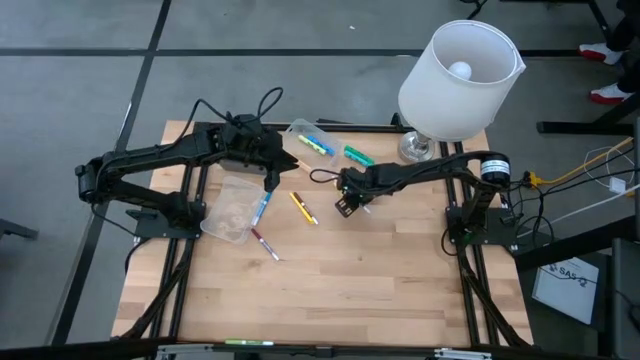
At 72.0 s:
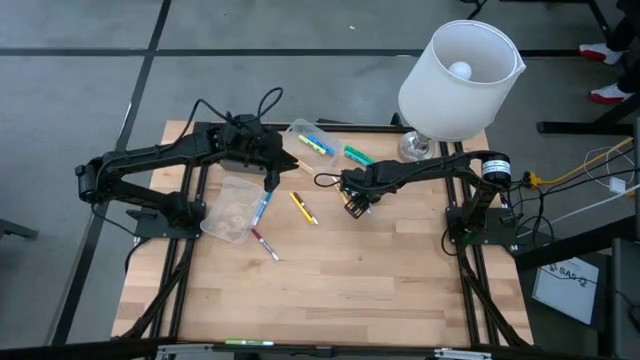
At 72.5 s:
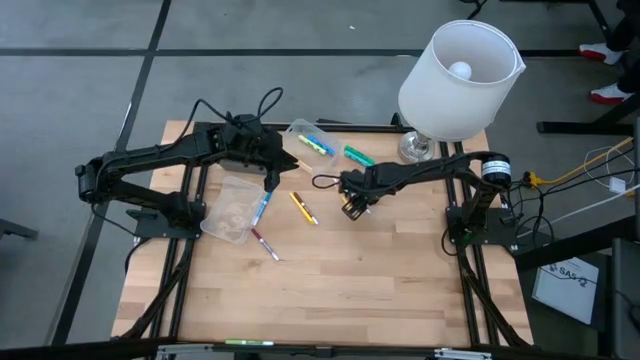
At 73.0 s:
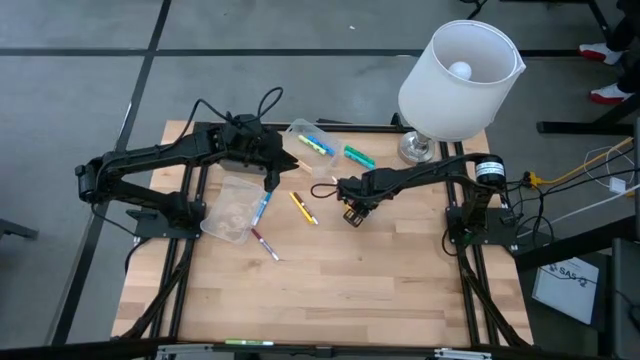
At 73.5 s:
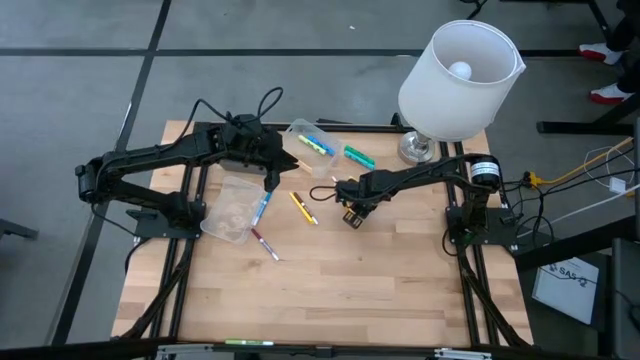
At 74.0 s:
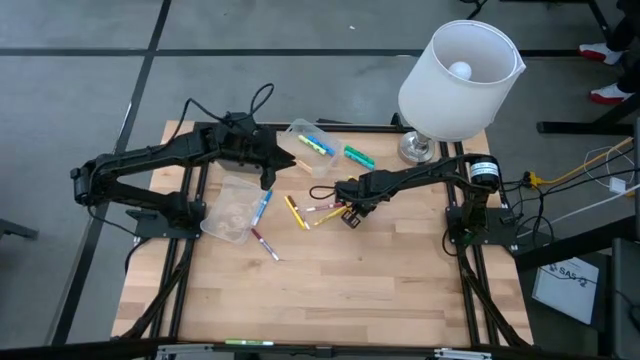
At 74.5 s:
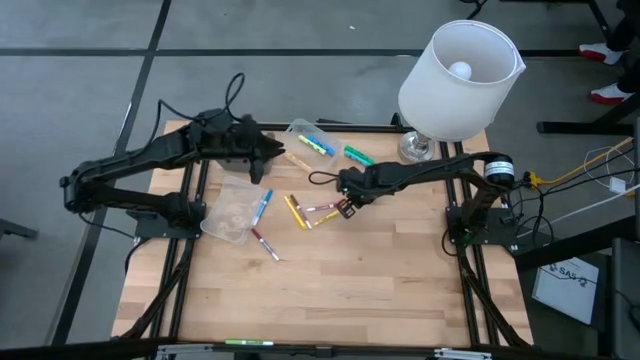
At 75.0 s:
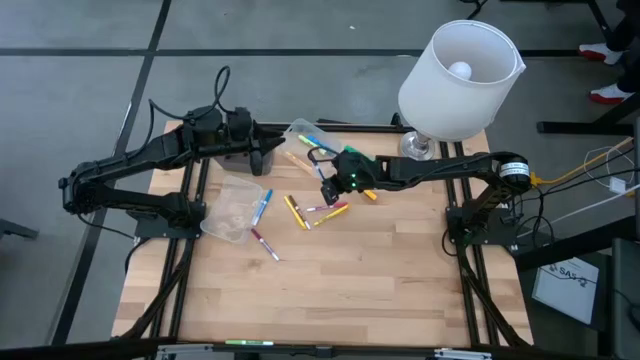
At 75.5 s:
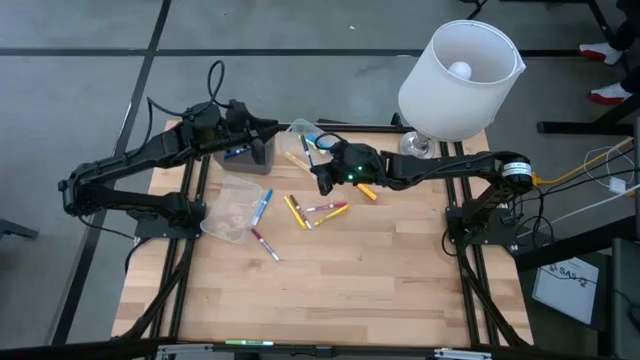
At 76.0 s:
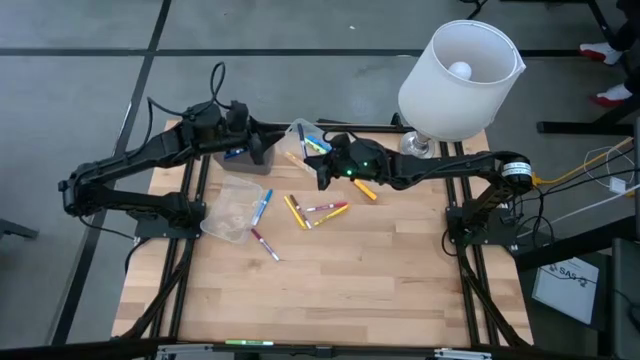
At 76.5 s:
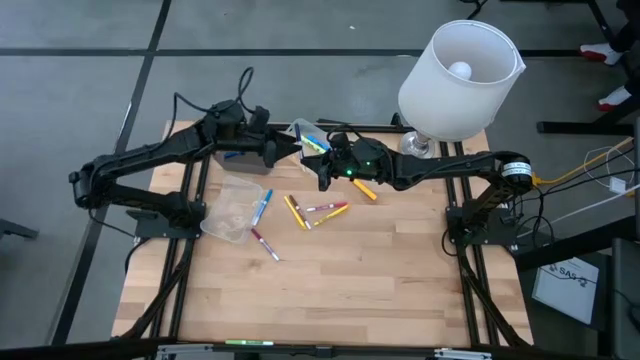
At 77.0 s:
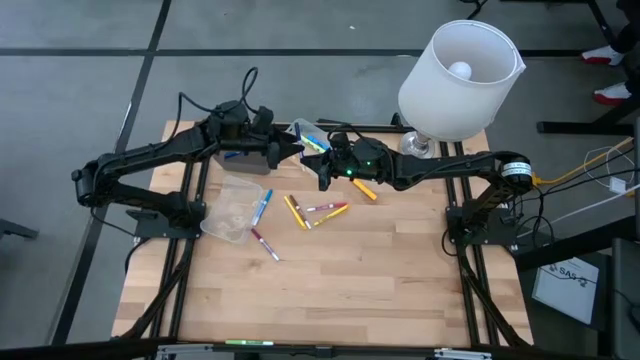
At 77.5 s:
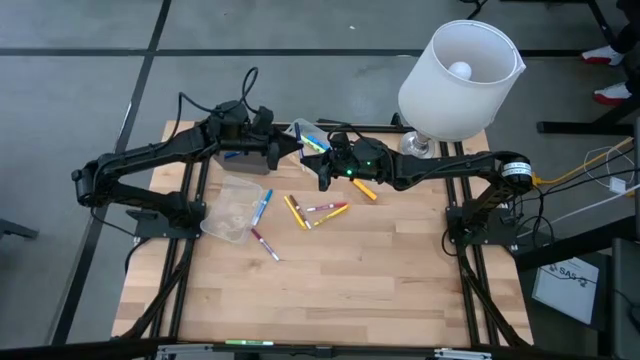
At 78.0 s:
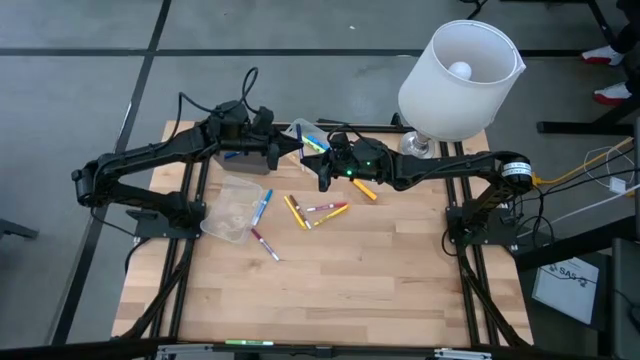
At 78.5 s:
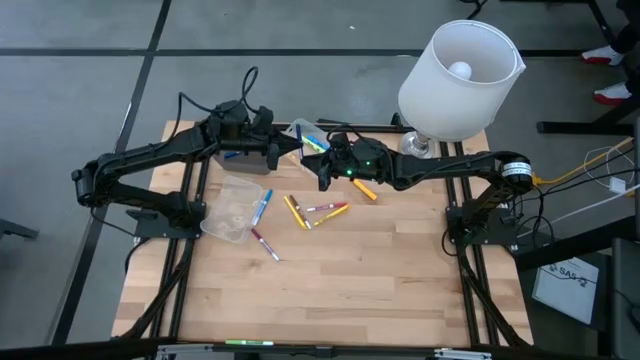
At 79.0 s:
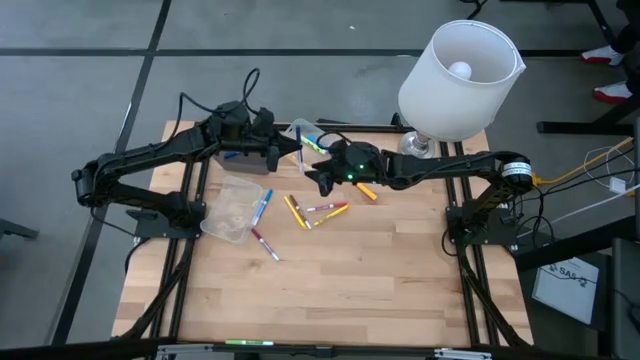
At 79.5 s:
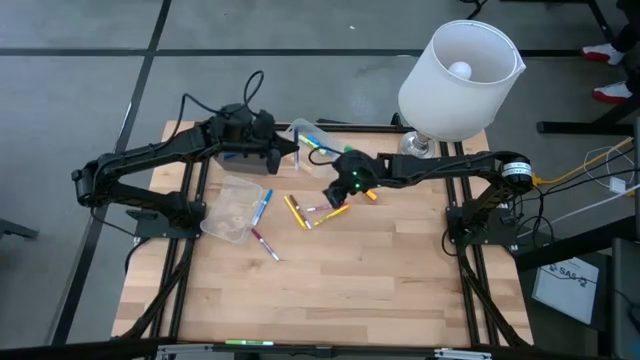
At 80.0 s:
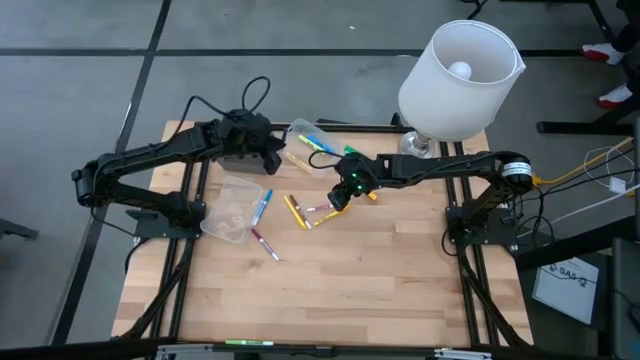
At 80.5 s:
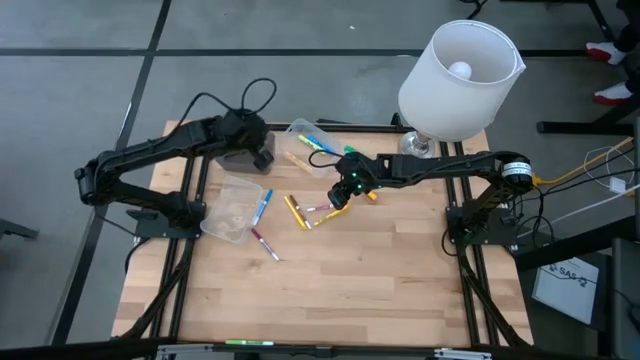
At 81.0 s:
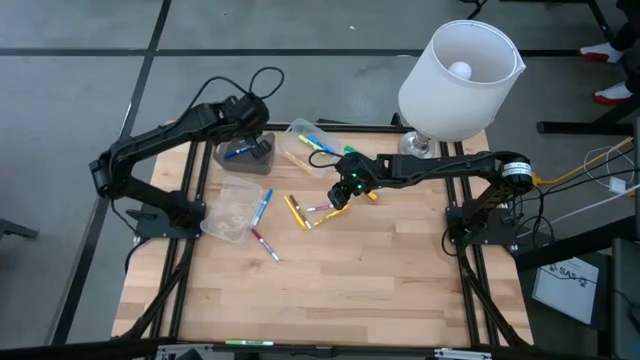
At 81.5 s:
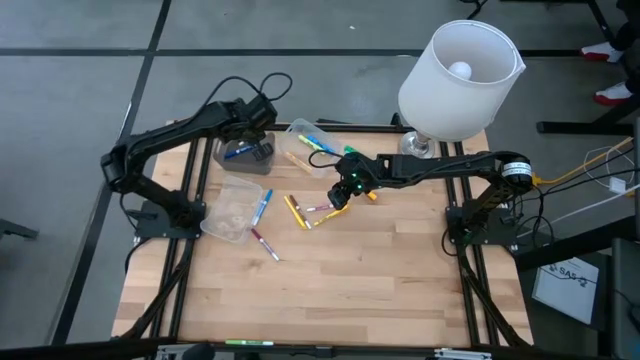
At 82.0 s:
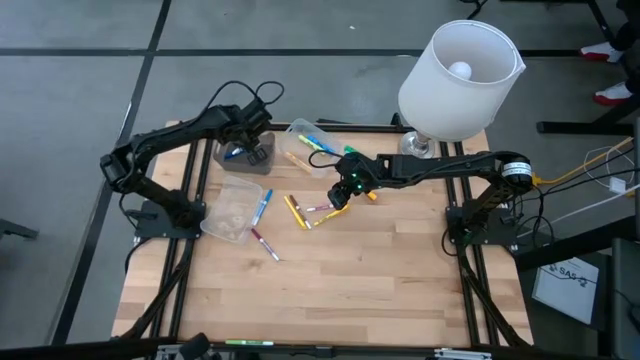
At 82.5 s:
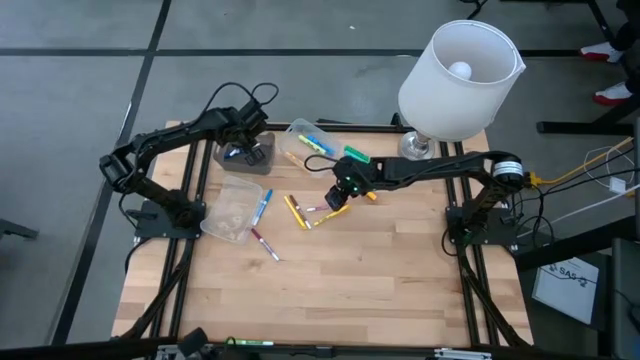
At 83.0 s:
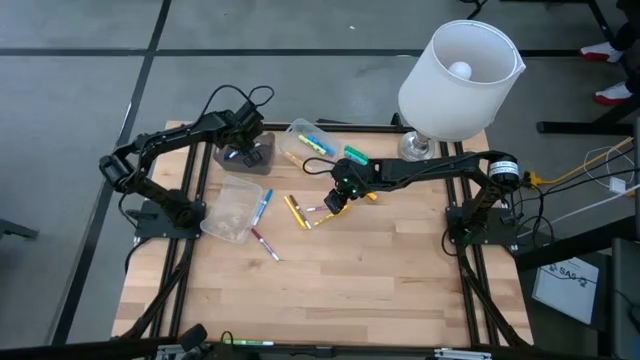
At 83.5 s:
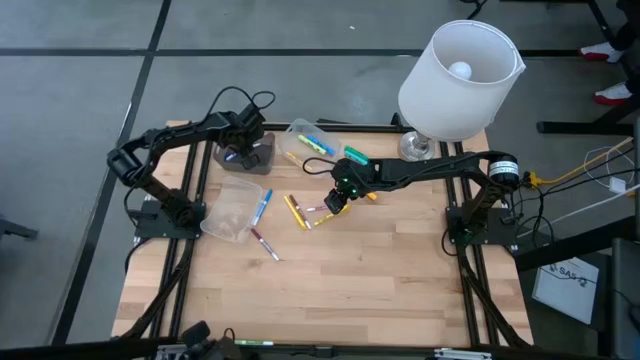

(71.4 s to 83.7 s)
Task: Pick & Place Markers
Put the violet marker into the black bin

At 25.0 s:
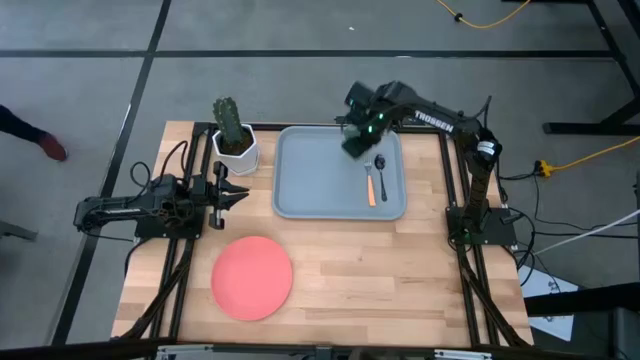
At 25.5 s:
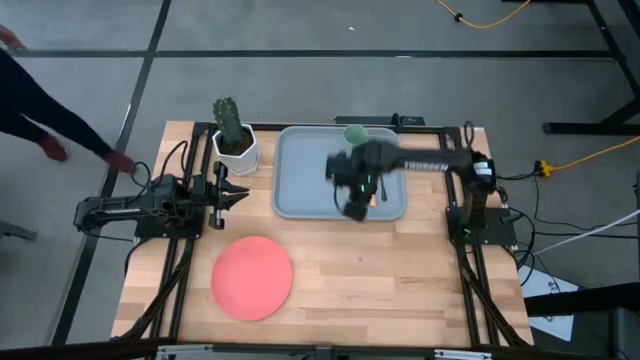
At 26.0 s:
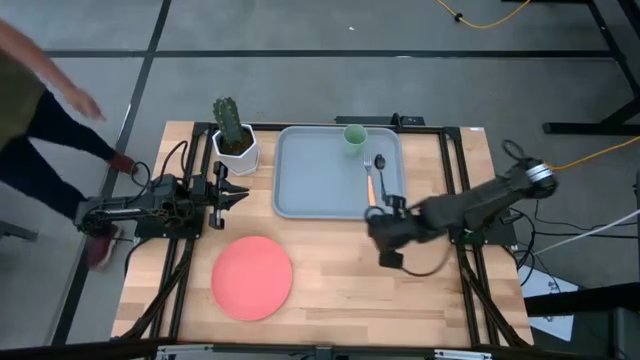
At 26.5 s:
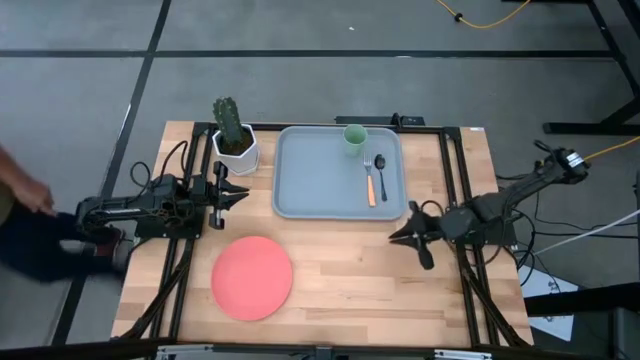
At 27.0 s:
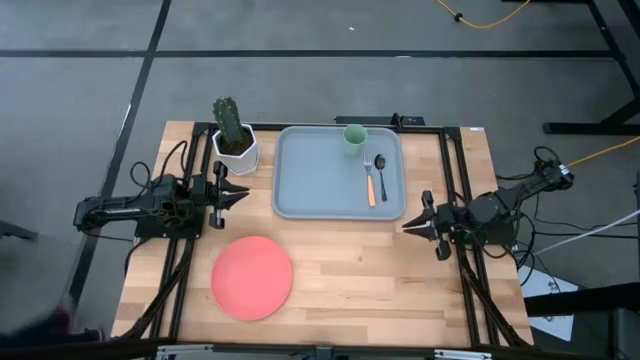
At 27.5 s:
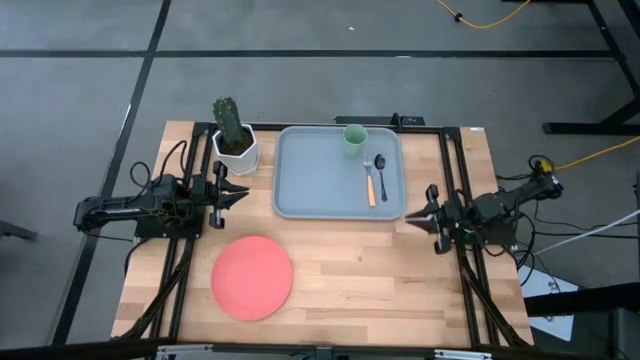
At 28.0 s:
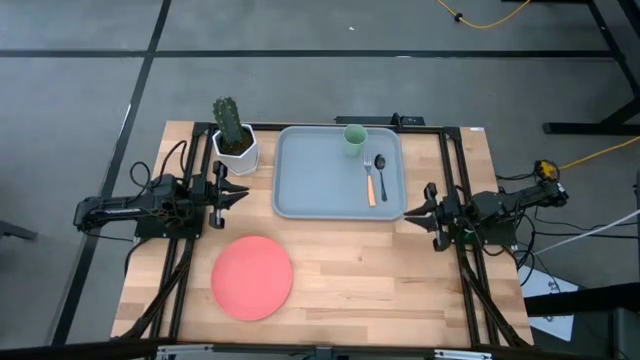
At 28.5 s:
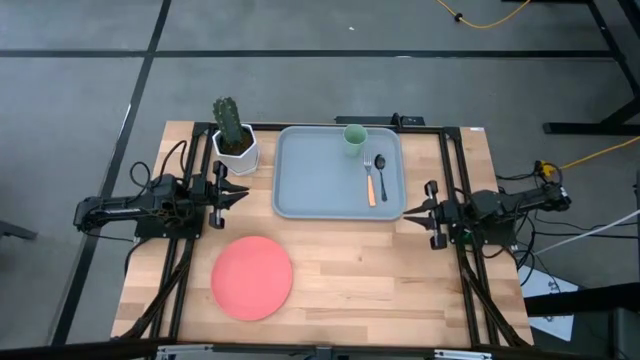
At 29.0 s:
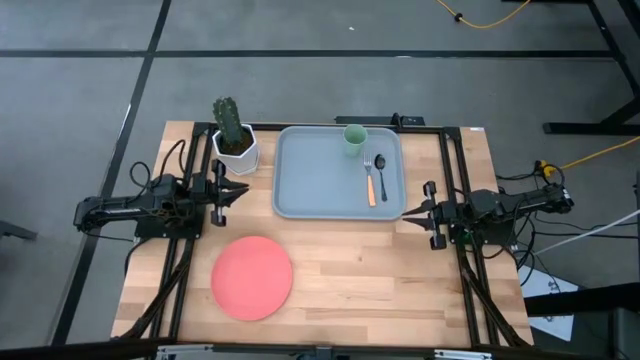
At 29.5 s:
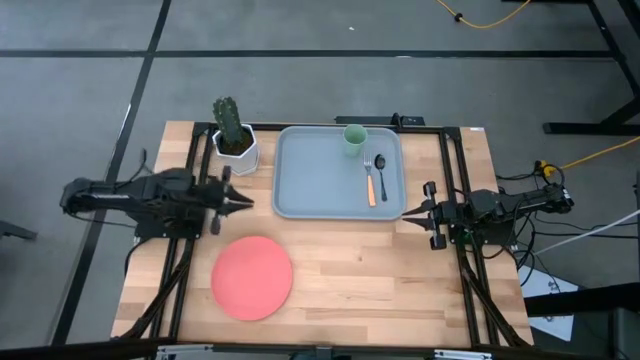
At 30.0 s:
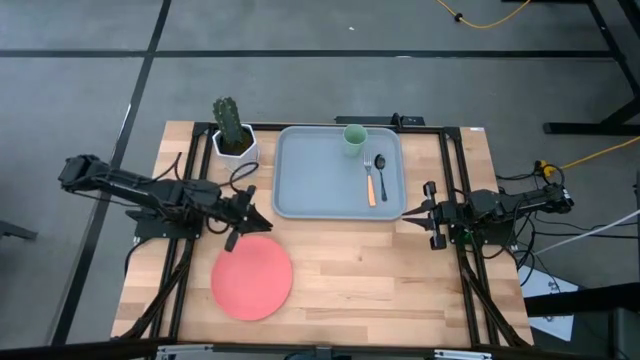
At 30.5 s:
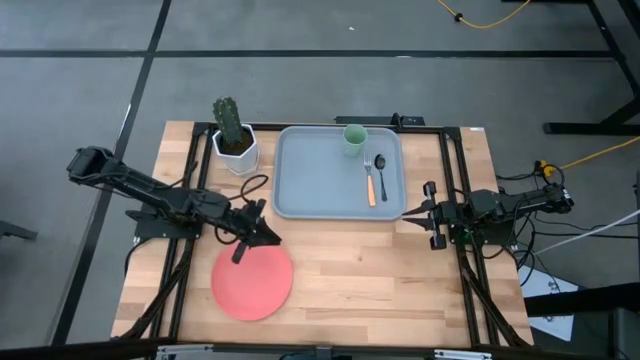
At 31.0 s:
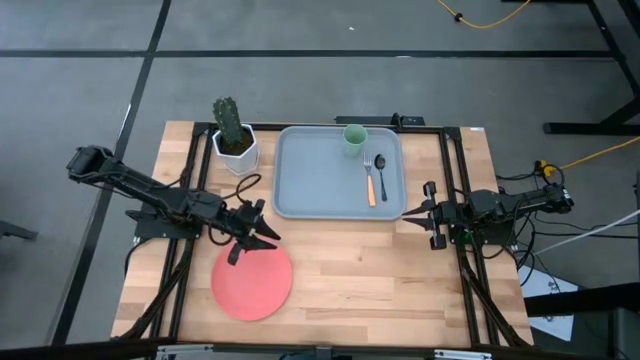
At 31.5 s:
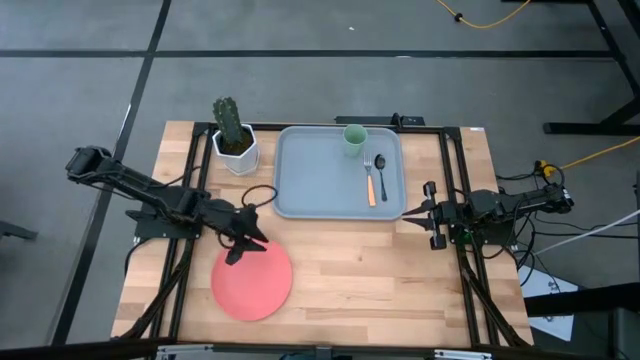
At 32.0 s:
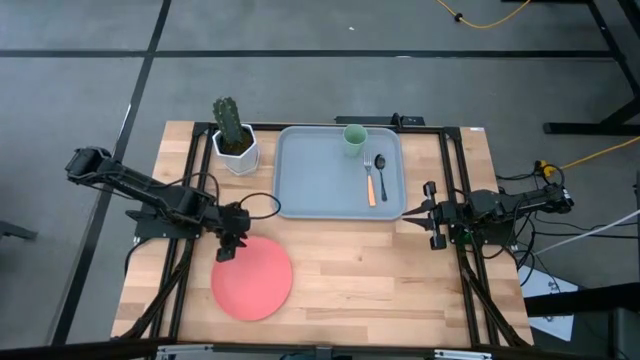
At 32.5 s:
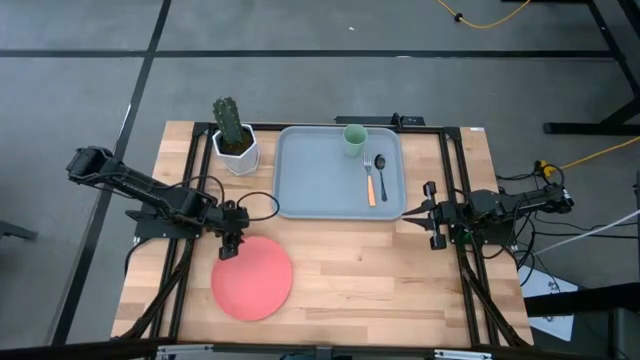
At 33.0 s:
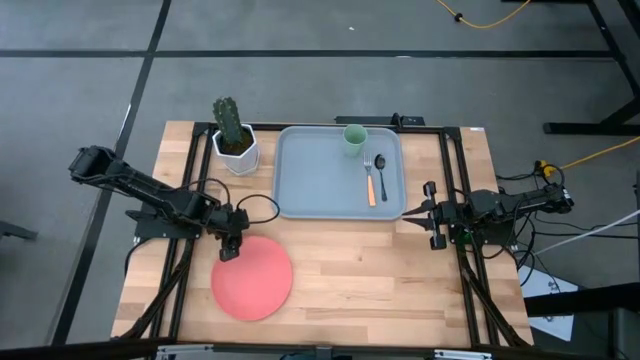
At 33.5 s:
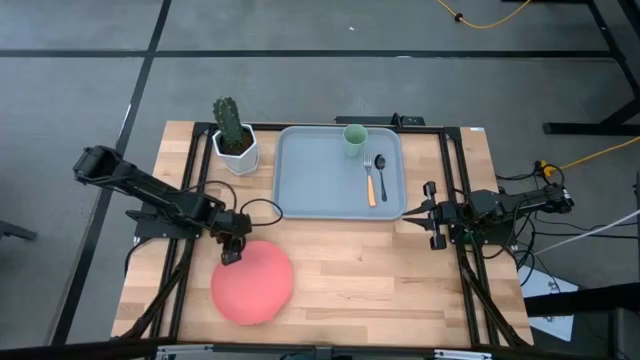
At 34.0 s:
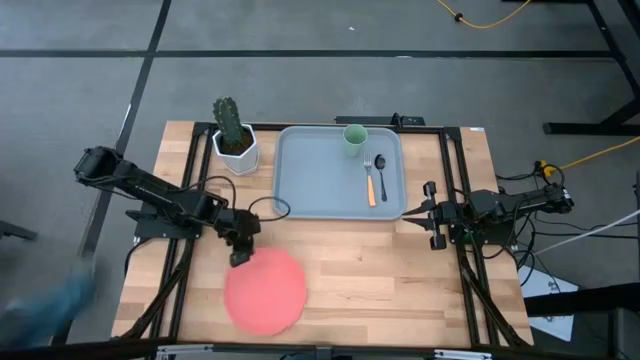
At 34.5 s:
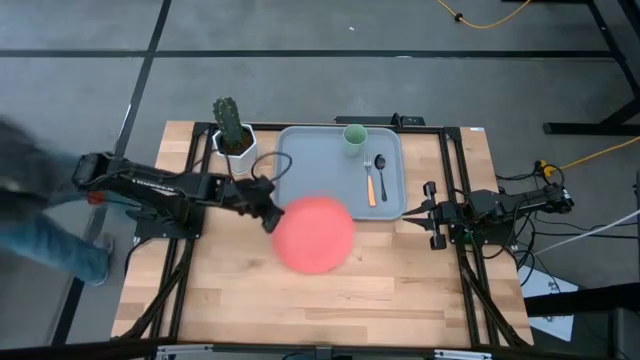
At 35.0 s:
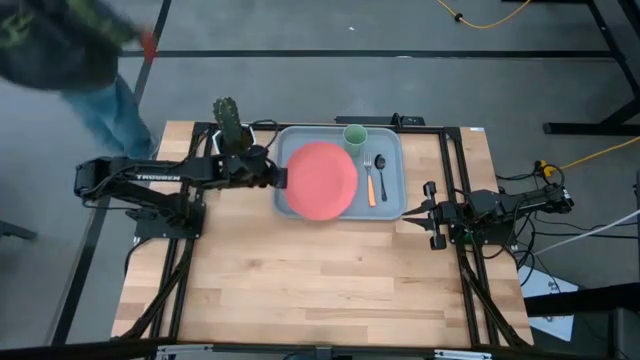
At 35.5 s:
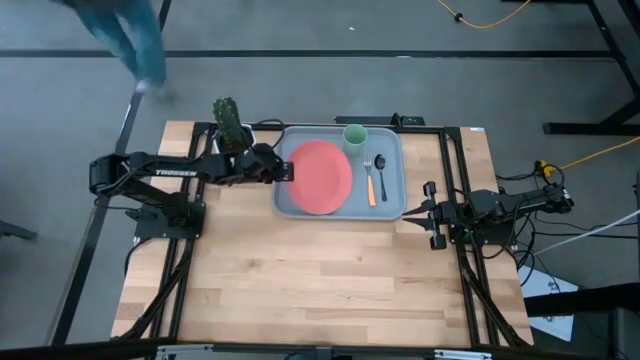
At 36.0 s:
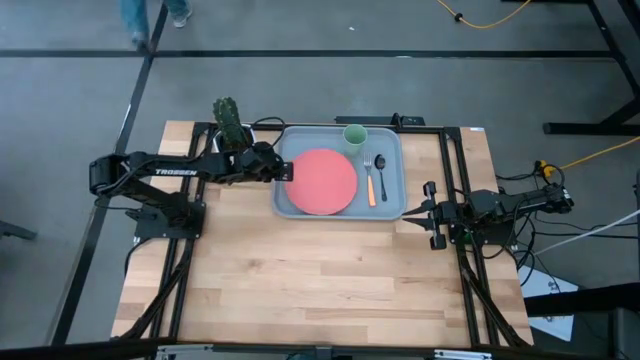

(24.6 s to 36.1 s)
Task: Pick and place plate/cup/fork/spoon on tray
Put the pink plate on the gray serving tray to the left of the orange fork
